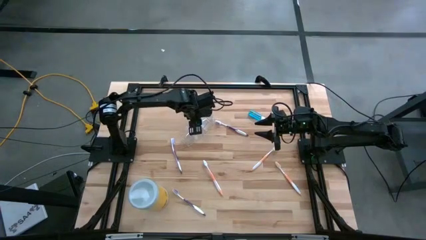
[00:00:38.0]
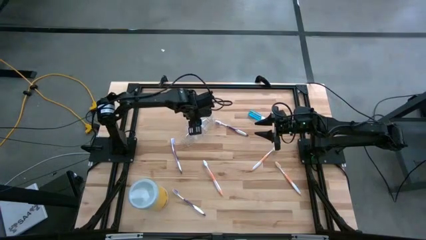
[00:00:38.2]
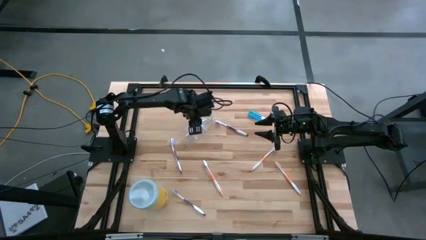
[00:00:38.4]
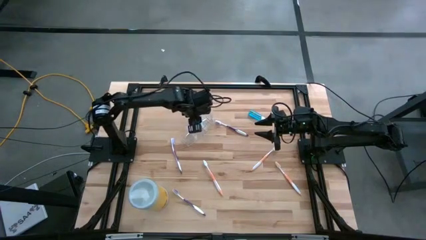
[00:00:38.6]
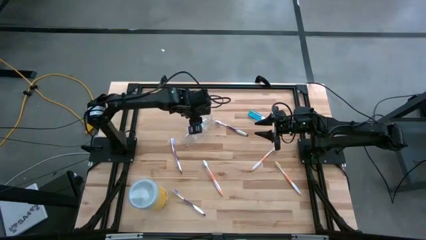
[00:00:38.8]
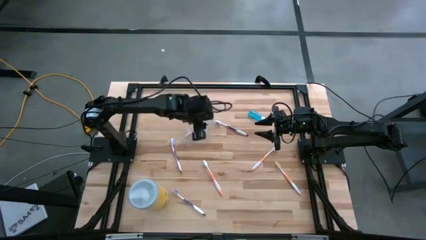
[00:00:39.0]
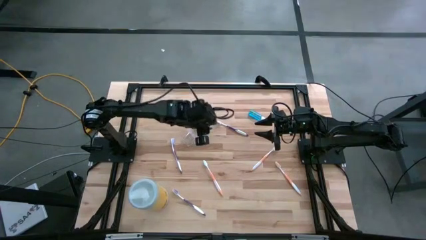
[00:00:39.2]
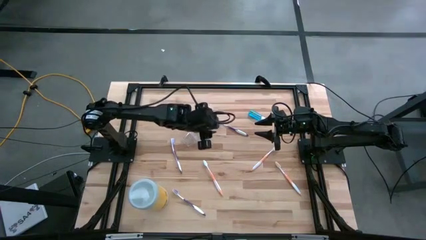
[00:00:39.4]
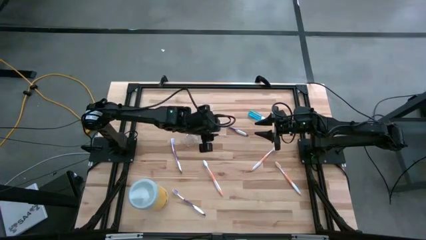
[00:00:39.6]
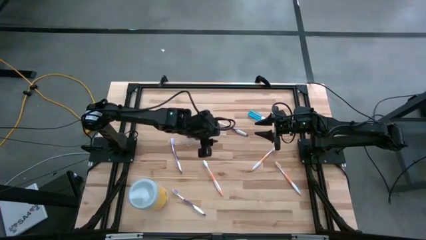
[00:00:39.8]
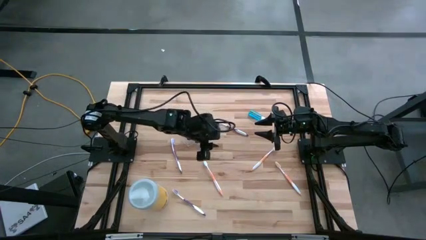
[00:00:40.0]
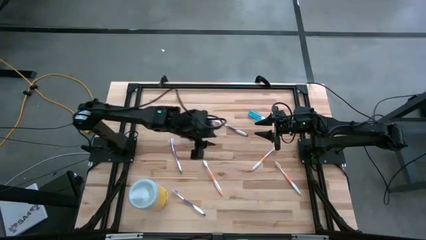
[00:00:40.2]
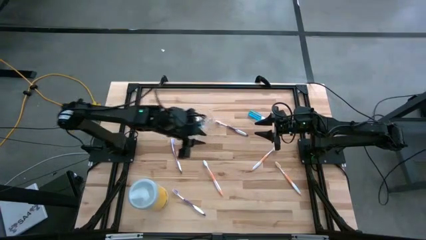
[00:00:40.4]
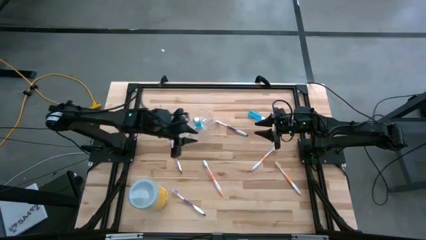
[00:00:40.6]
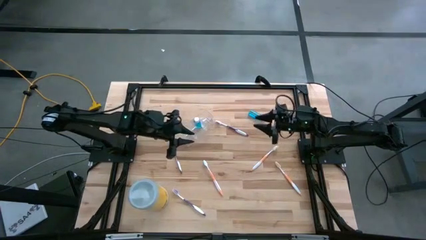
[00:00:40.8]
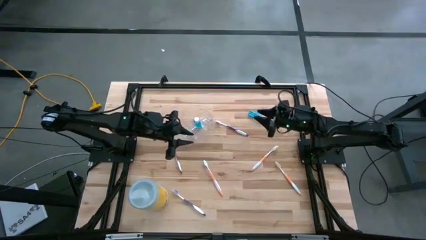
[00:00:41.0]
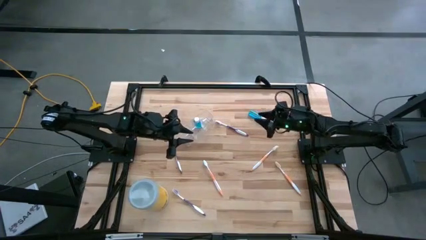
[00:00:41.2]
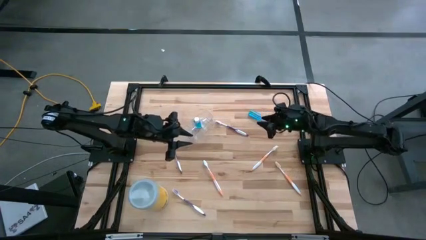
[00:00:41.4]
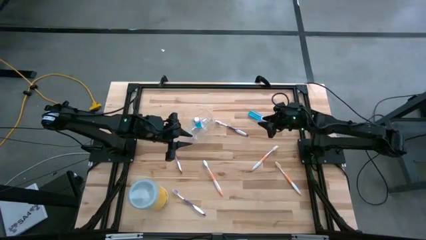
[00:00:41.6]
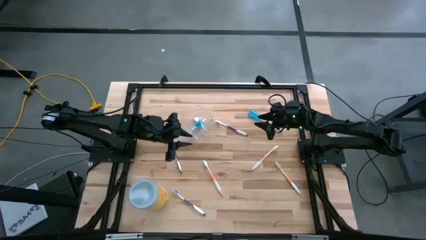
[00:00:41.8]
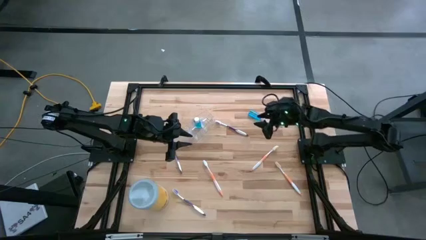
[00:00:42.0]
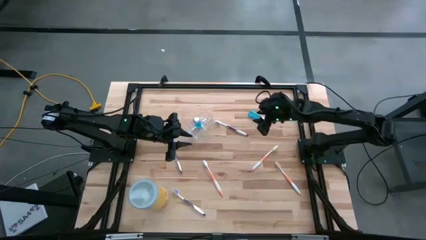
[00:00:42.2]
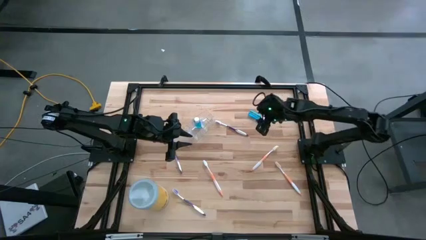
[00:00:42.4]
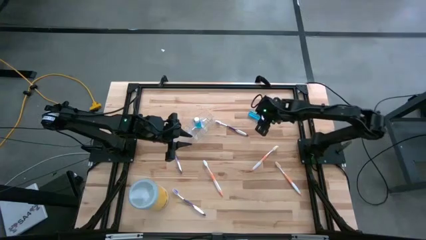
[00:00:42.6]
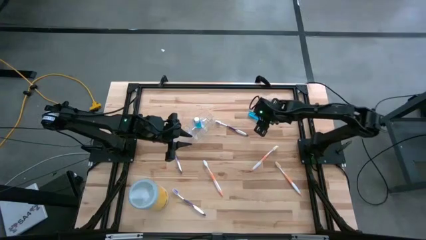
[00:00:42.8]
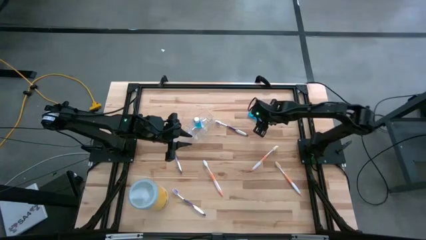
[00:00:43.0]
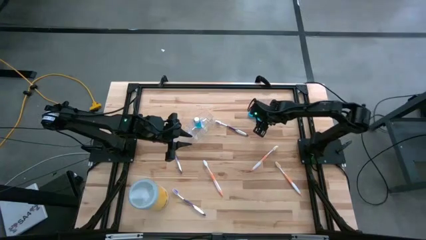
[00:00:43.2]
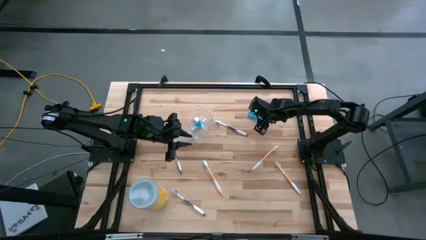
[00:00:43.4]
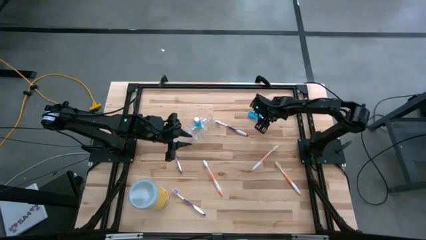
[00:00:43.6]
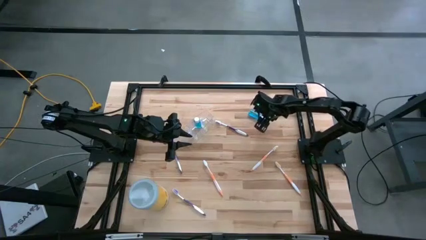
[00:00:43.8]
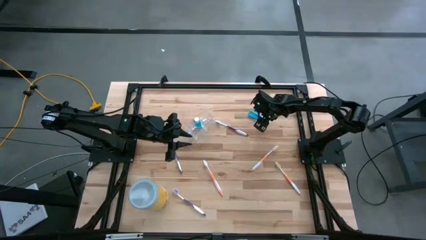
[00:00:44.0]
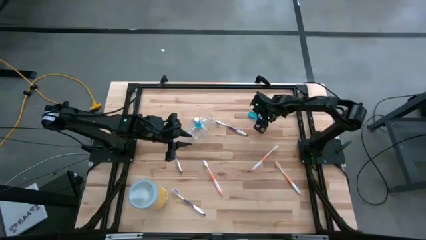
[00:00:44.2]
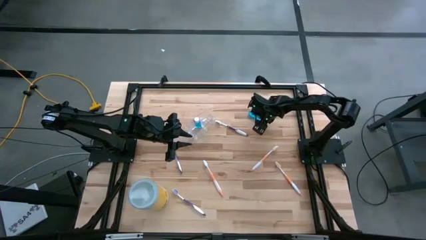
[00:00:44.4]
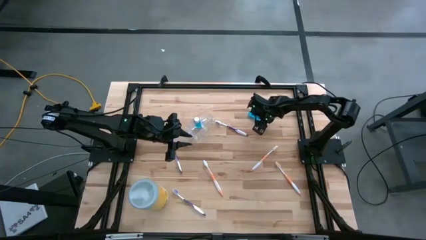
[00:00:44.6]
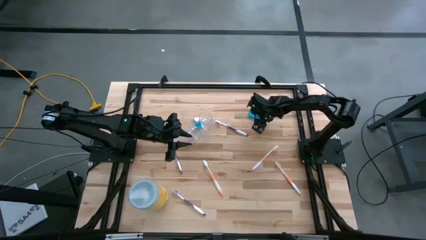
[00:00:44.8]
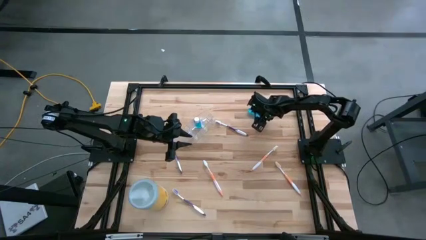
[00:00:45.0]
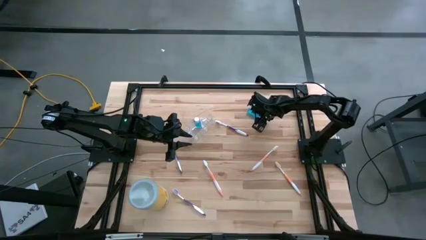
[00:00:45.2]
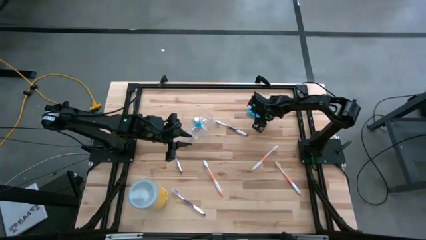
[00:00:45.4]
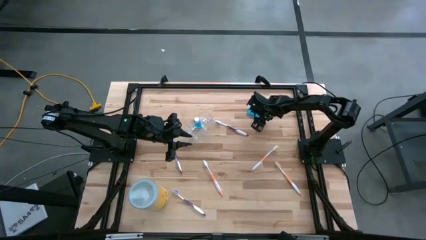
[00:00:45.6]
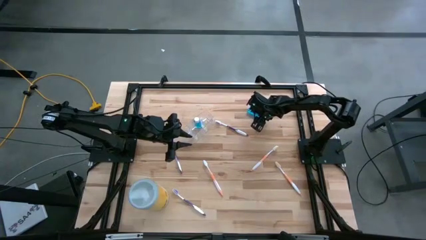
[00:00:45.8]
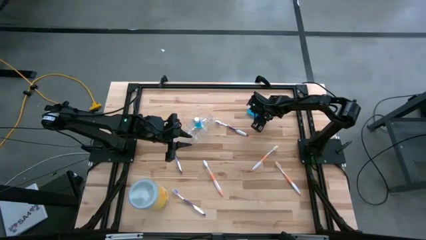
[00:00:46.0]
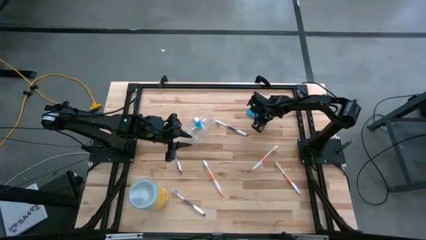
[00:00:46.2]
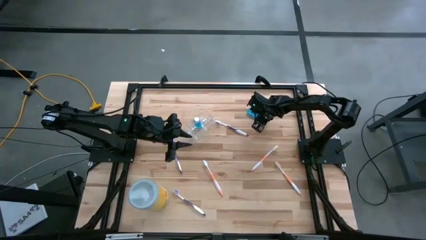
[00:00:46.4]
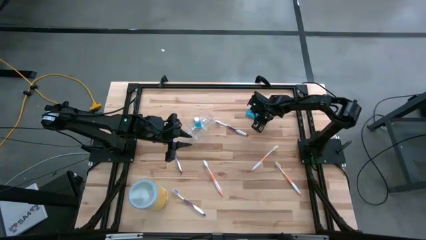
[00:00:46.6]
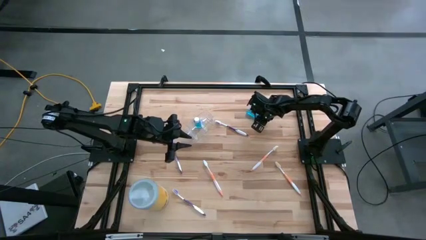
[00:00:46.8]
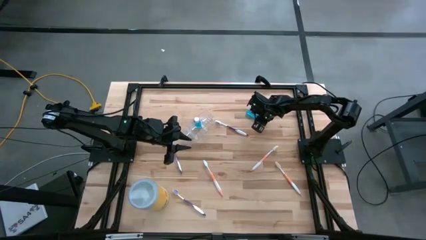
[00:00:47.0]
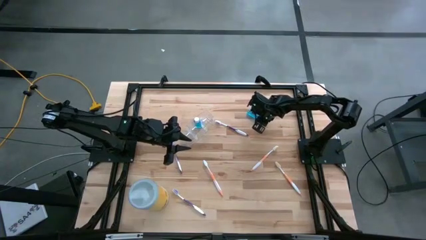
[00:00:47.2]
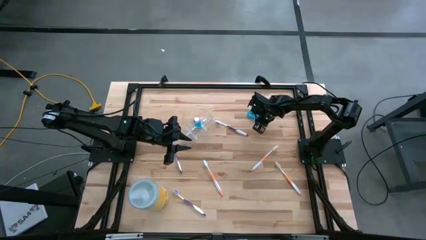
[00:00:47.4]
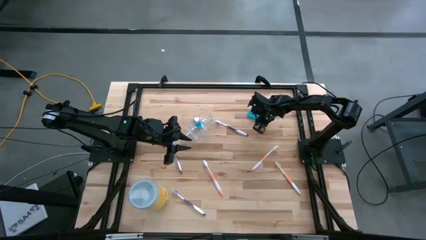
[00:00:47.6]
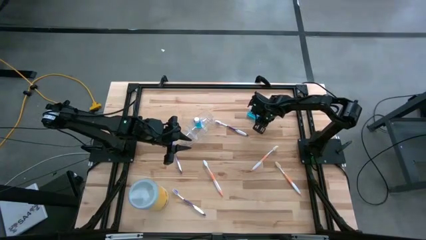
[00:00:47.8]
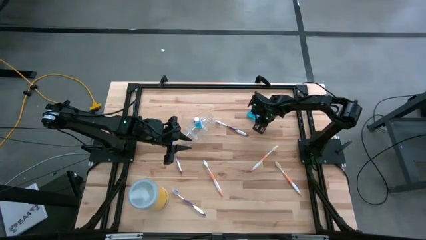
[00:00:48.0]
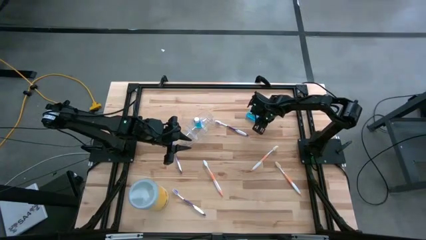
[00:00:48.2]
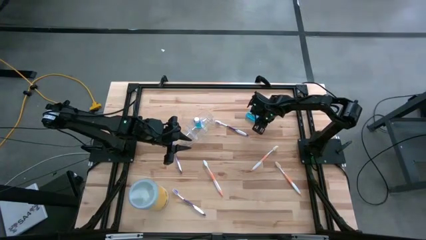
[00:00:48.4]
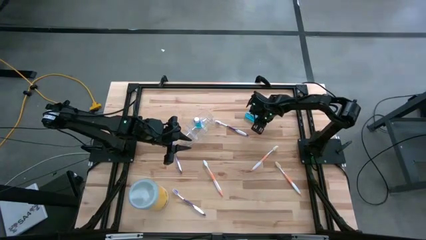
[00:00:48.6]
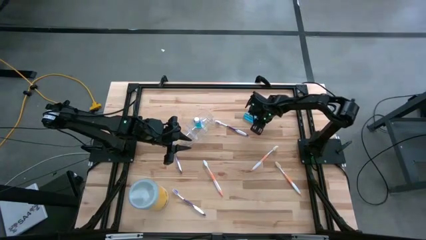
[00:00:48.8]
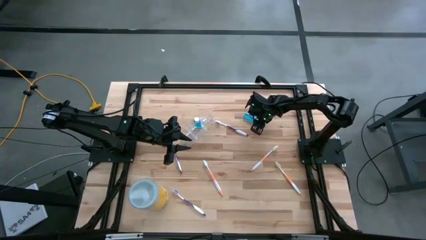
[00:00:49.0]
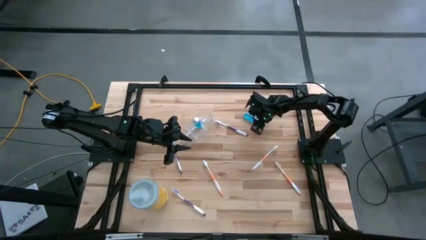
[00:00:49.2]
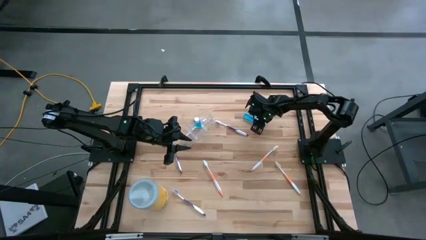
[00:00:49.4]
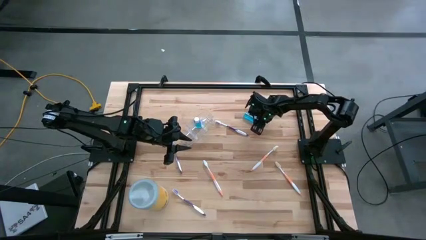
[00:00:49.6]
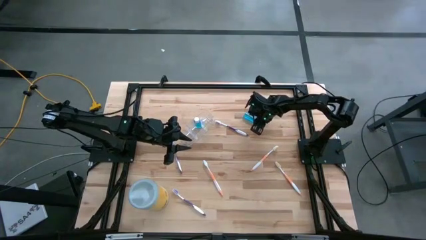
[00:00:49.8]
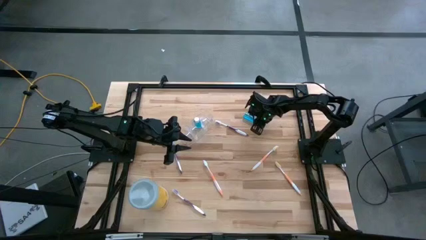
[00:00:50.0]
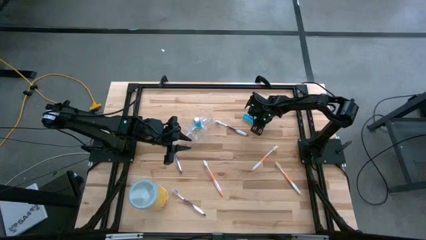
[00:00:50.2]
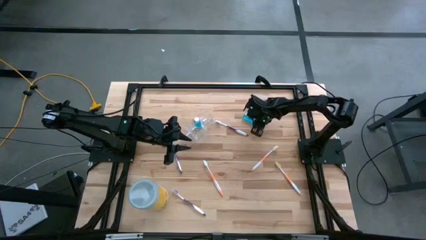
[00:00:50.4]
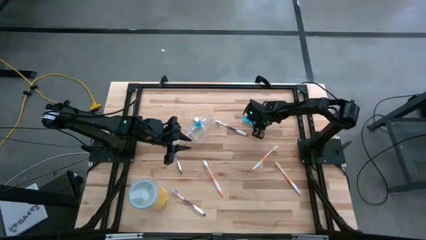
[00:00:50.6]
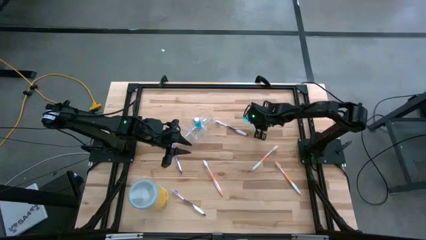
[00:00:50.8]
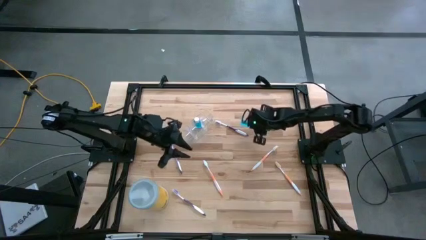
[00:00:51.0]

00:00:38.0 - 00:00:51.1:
Task: Pick & Place toothbrushing station
Put the blue mouthwash into the transparent organizer
